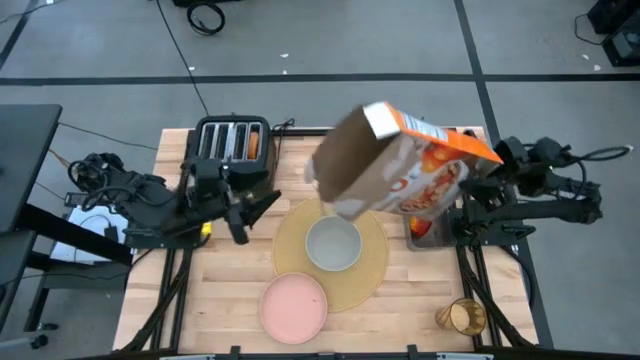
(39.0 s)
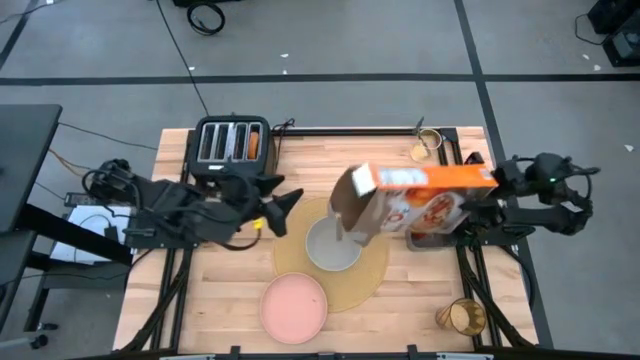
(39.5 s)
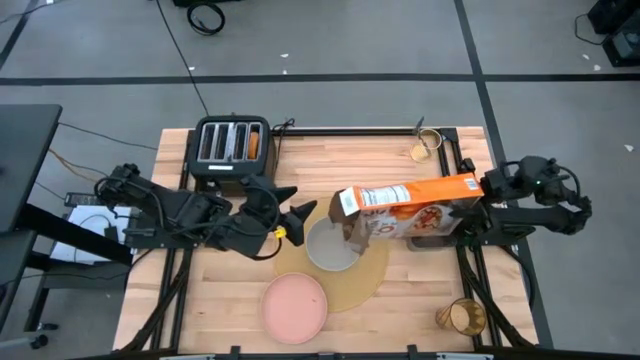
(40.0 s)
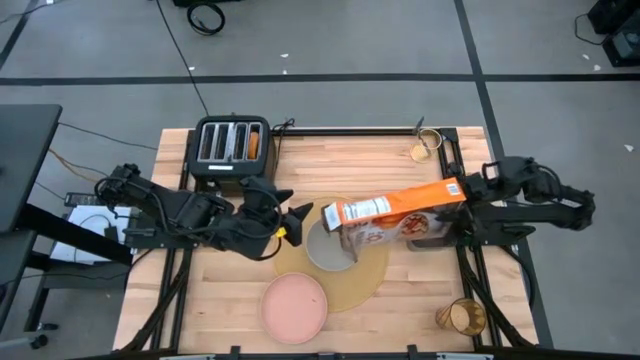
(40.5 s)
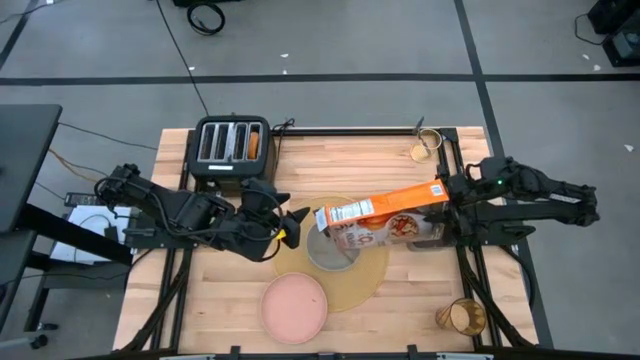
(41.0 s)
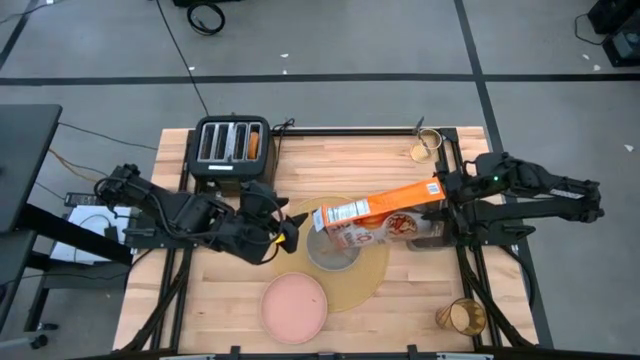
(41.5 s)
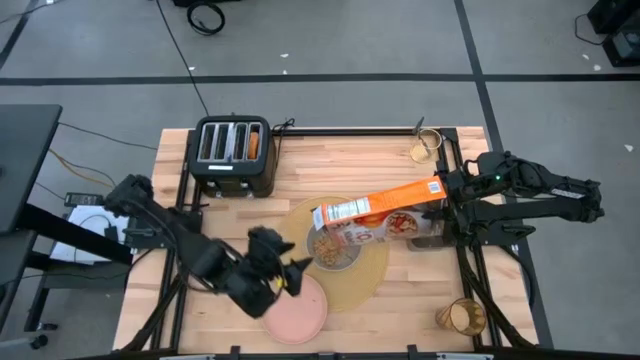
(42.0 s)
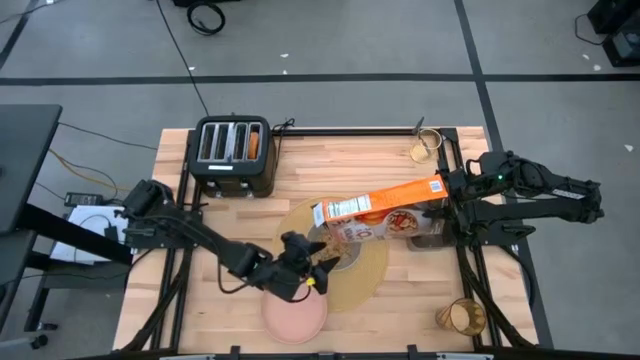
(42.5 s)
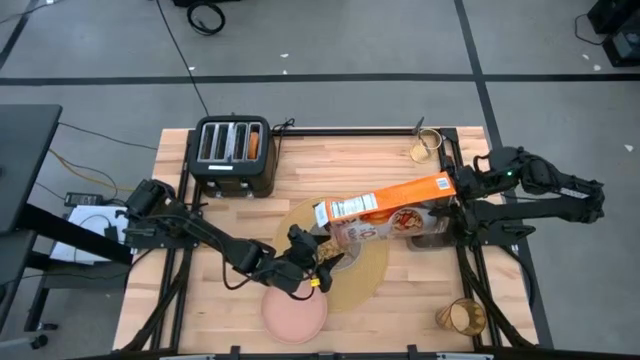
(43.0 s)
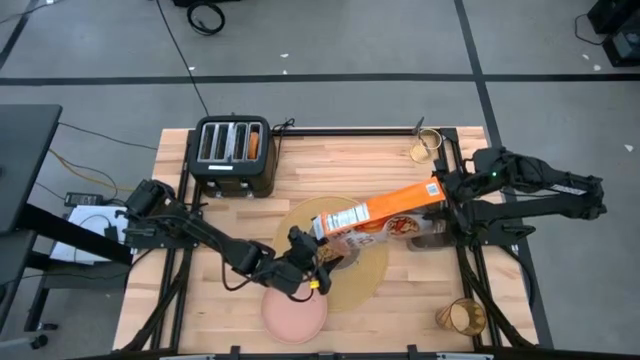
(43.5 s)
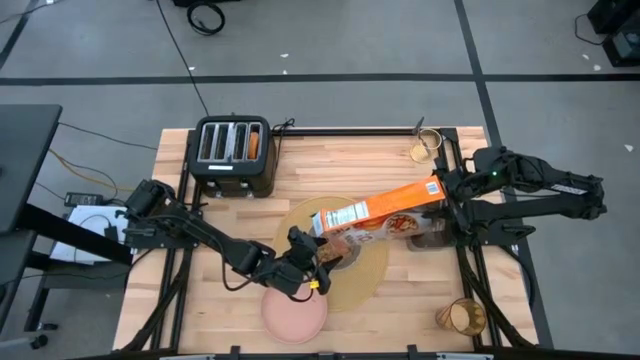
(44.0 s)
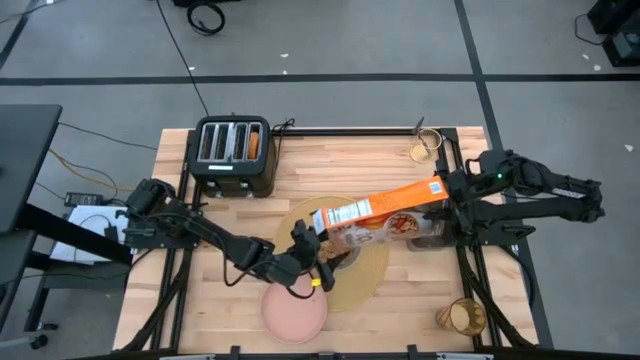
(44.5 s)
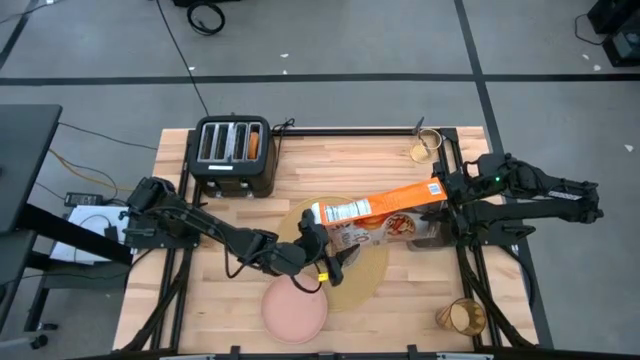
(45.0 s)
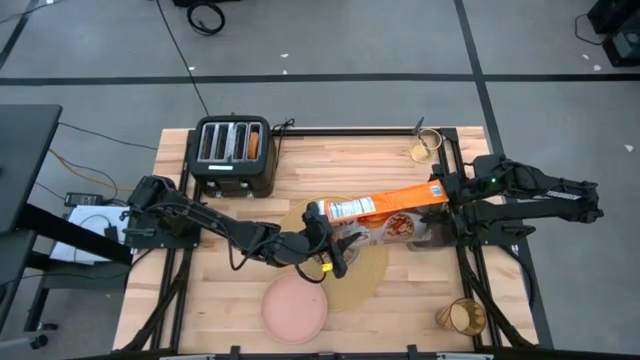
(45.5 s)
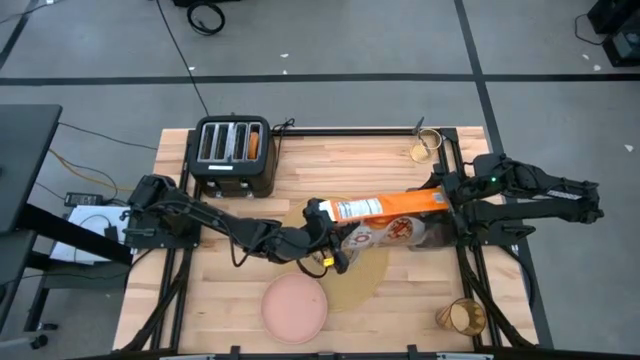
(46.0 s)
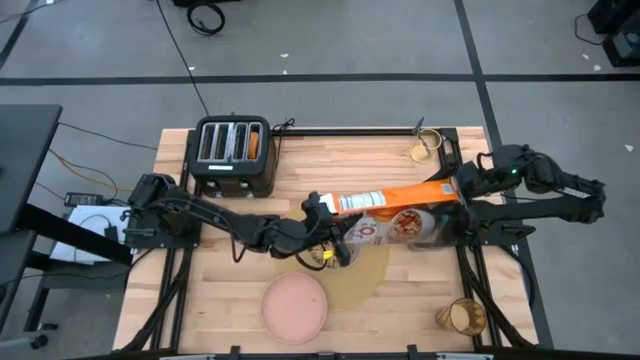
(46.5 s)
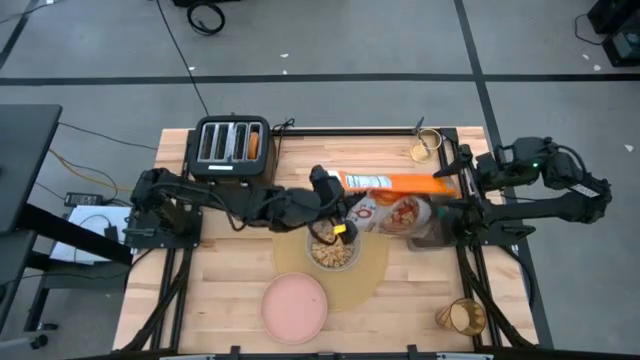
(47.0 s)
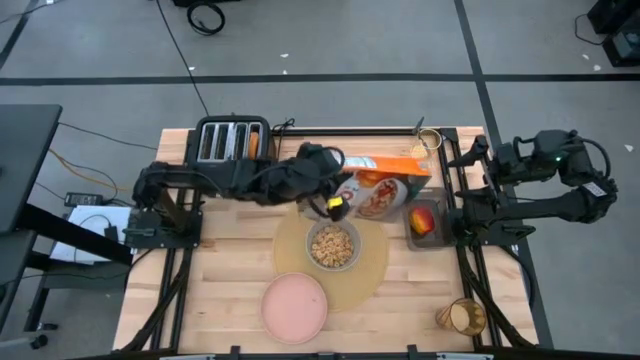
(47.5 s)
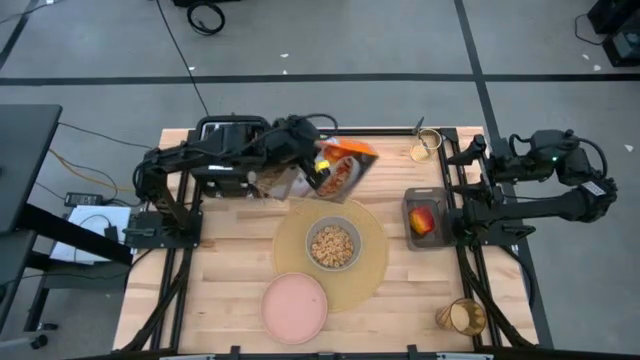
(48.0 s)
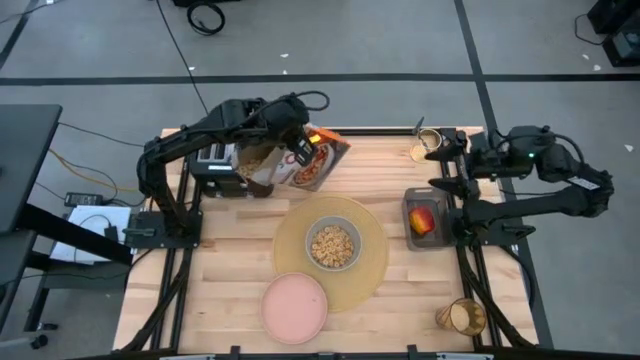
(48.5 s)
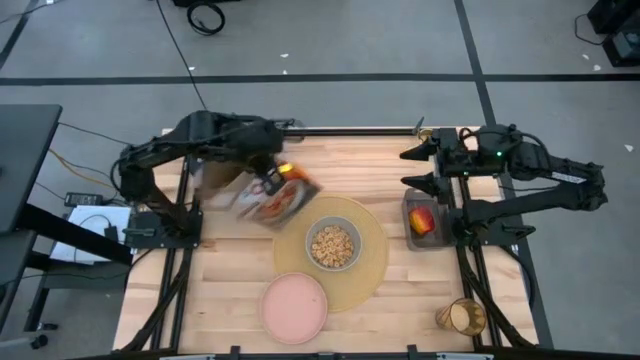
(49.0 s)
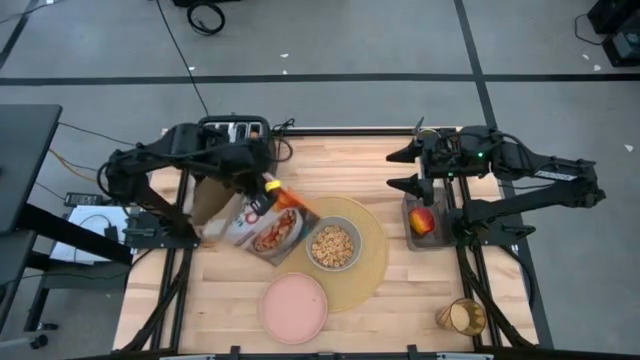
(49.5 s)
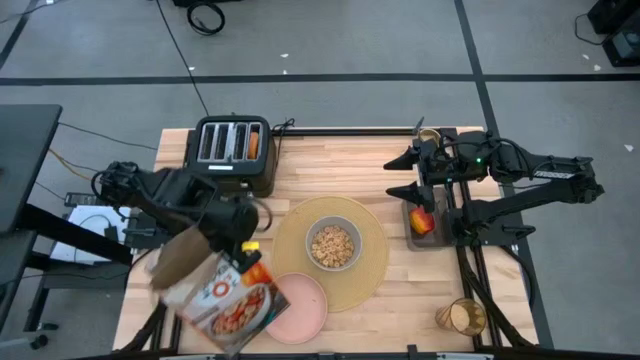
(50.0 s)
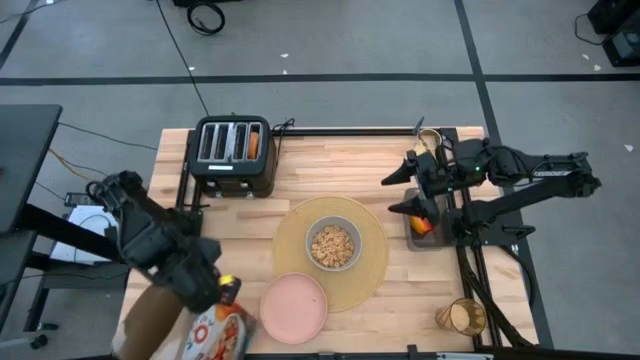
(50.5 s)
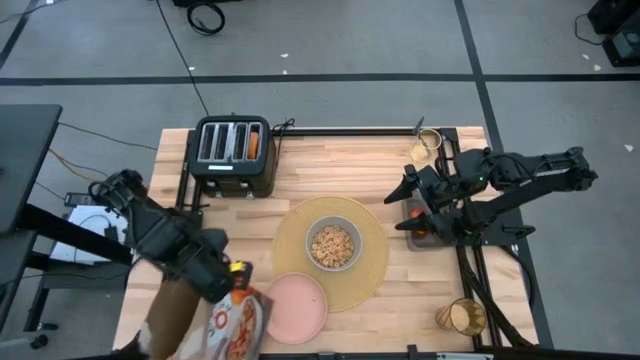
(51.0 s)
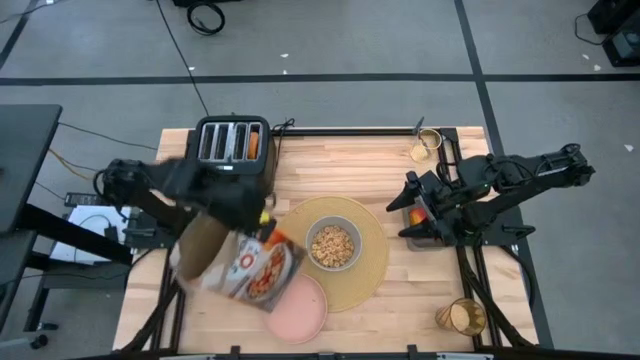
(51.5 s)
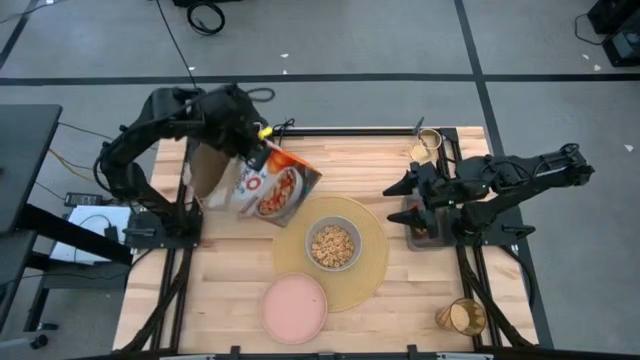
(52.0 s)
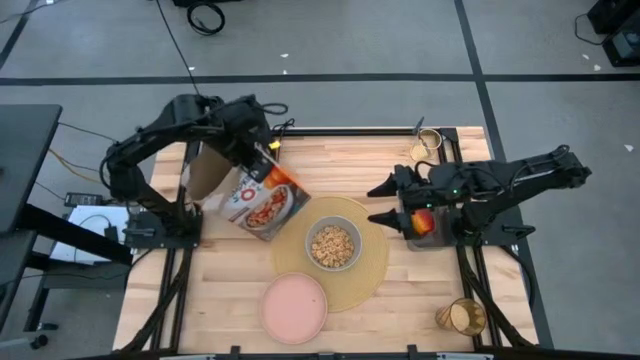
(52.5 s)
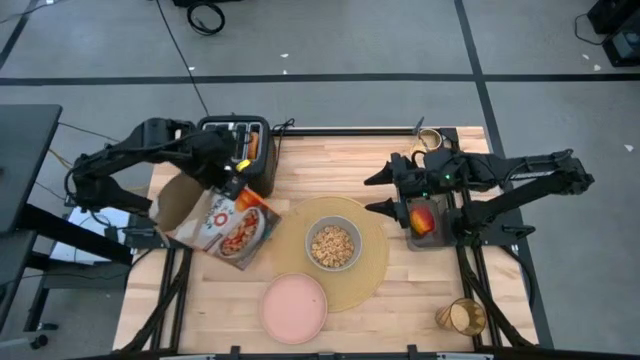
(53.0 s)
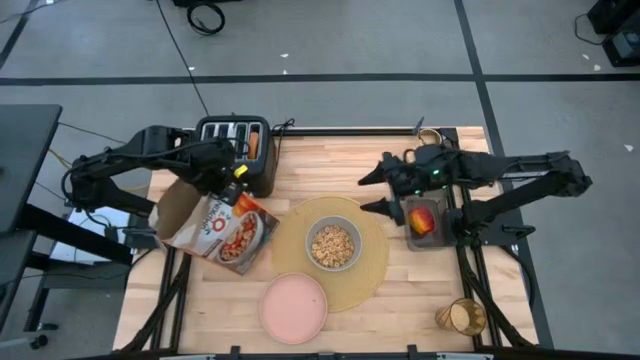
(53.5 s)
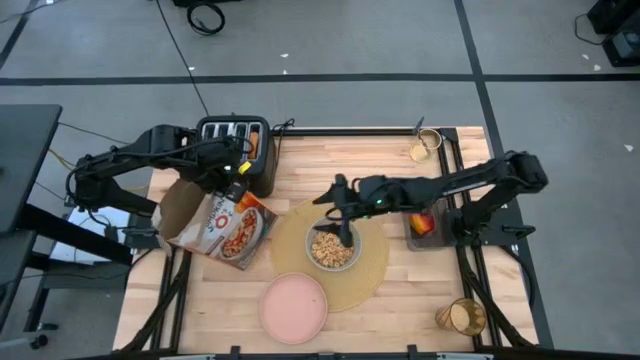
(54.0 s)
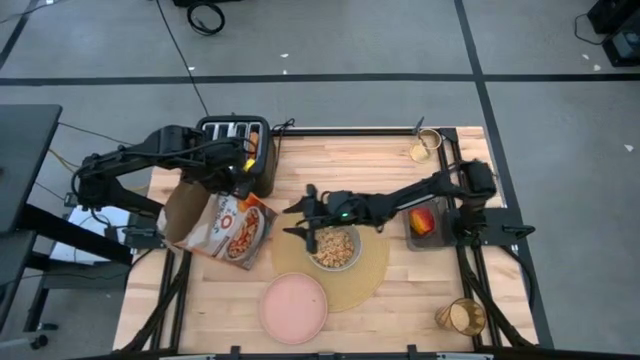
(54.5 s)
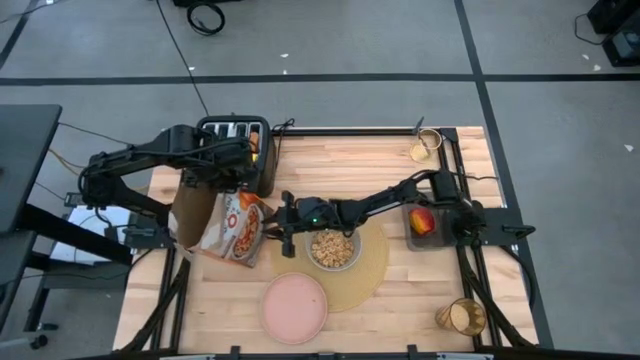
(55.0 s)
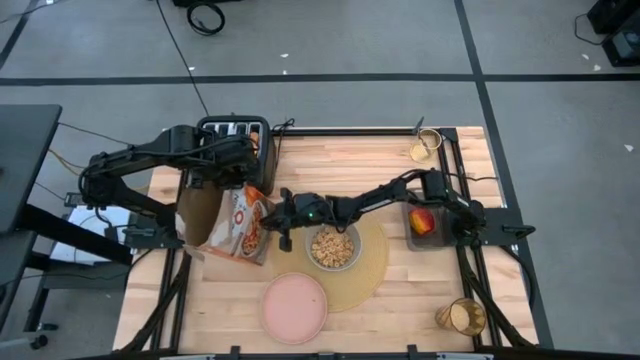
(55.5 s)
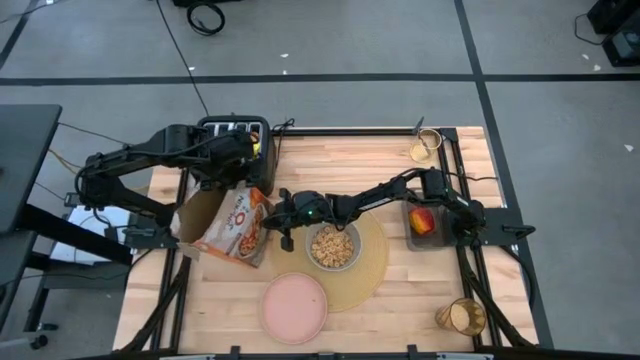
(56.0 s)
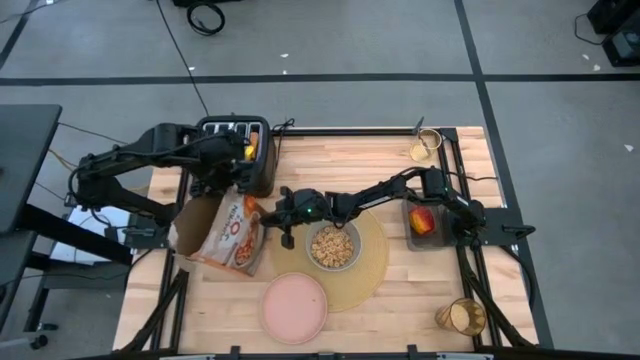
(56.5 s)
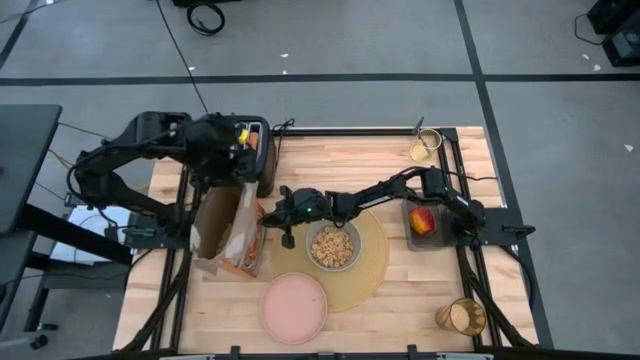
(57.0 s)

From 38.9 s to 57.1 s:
Task: Arrange a breakfast setting
Pour the cereal from the orange cereal box into the gray bowl

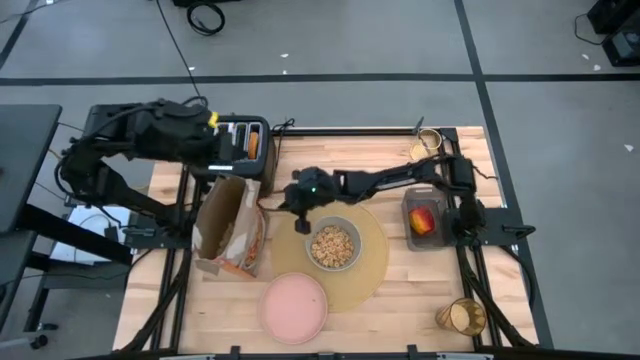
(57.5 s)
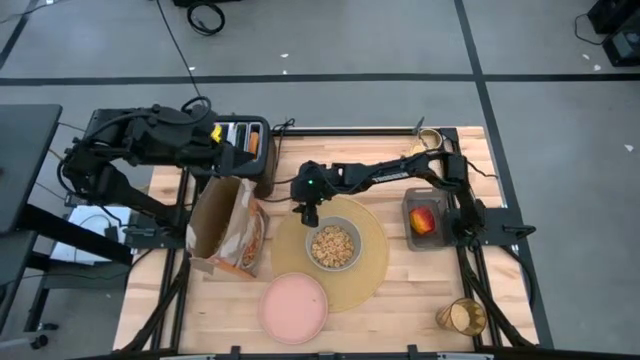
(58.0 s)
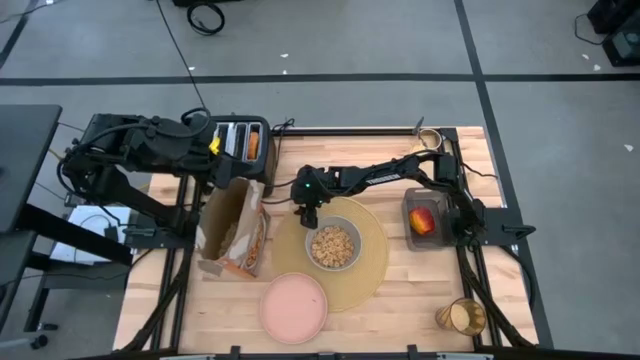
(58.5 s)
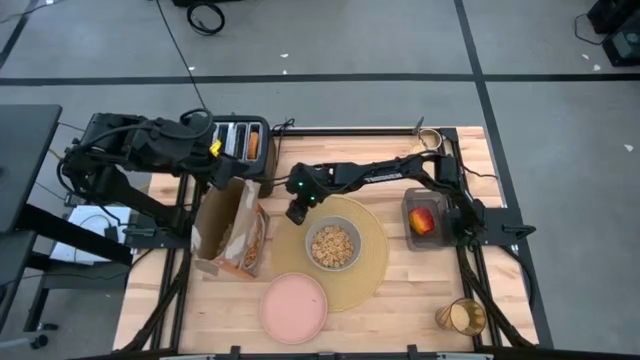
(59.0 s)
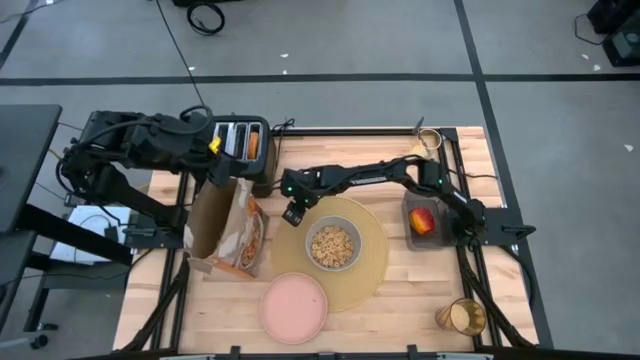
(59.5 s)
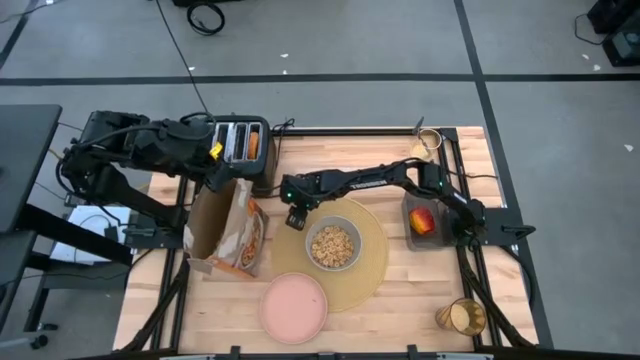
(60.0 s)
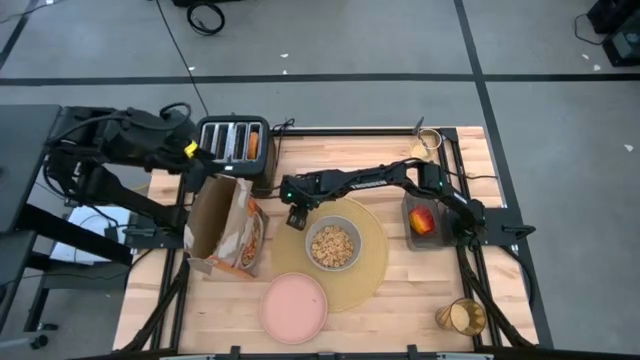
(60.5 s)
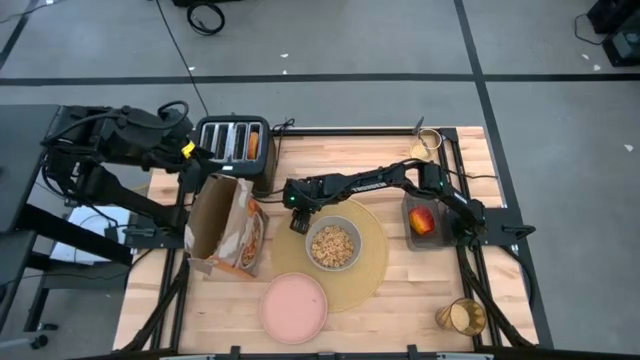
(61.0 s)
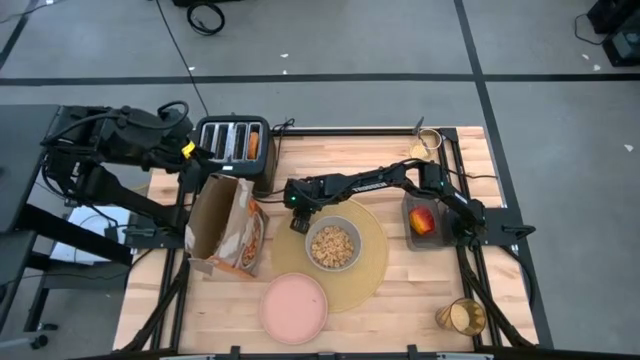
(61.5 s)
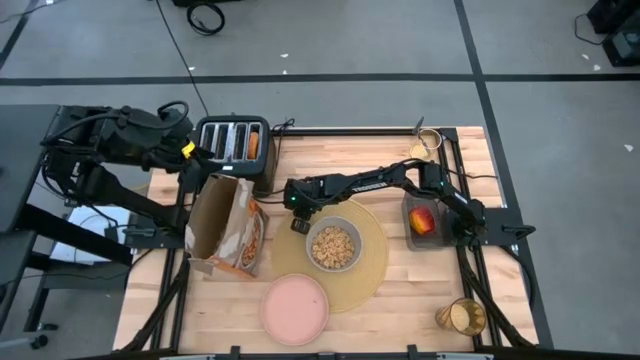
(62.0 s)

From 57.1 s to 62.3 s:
Put the cereal flake in the gray bowl
